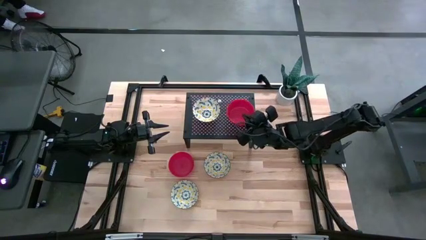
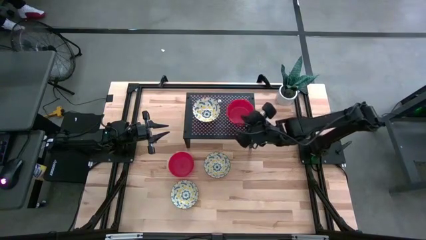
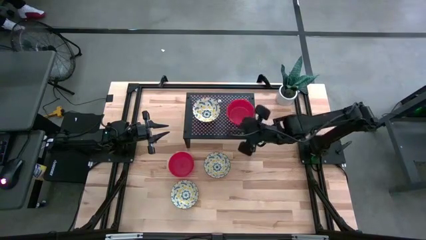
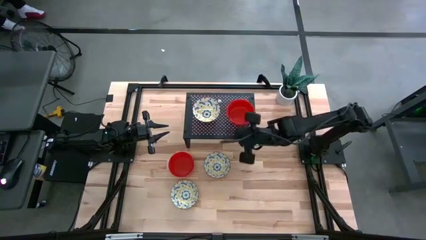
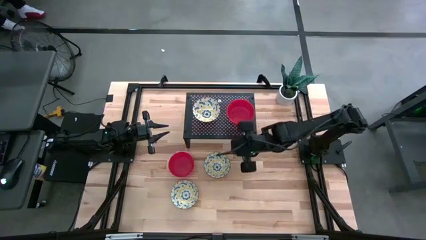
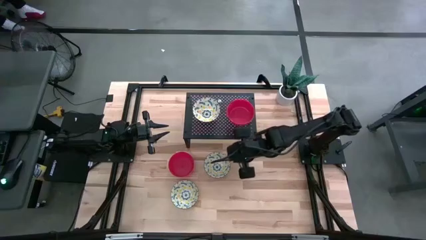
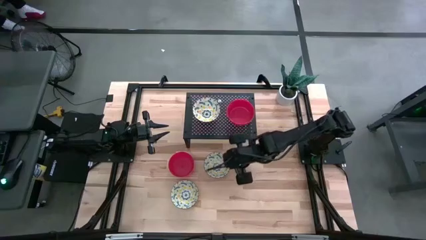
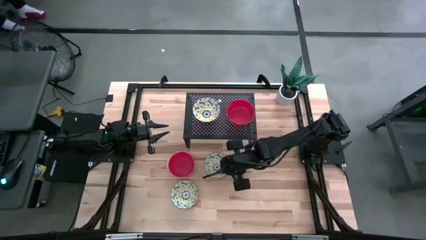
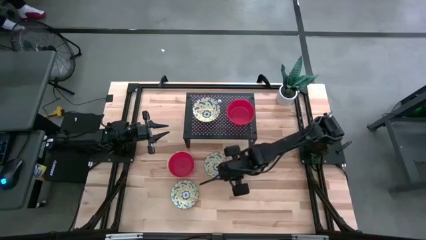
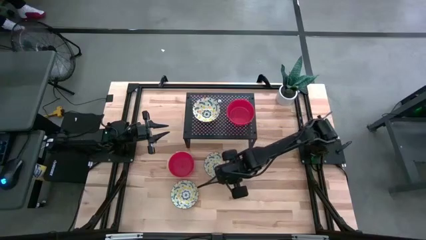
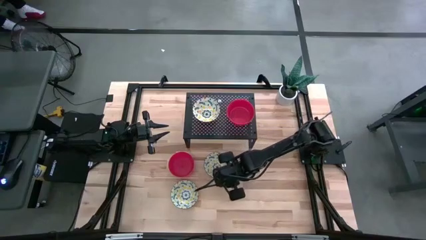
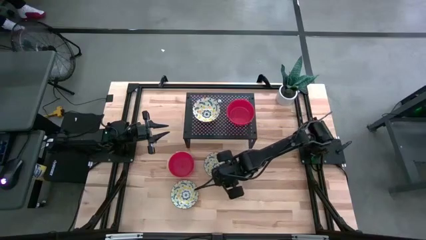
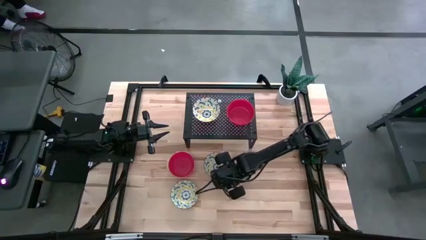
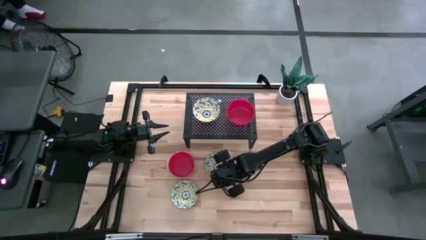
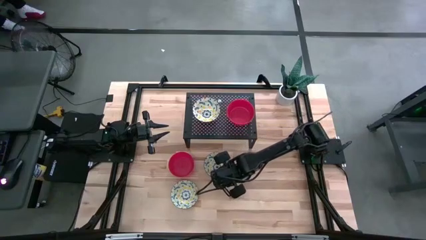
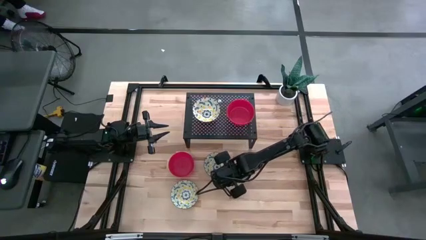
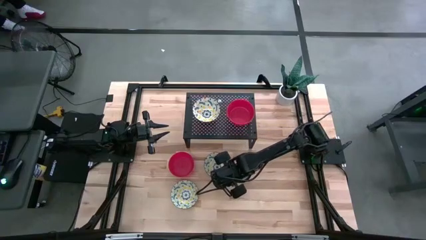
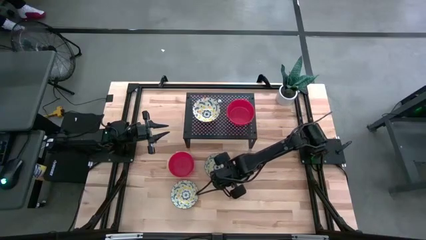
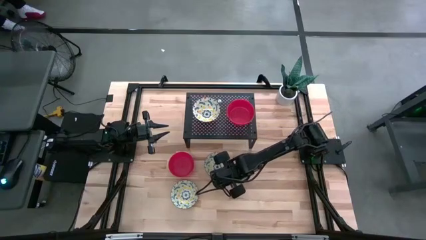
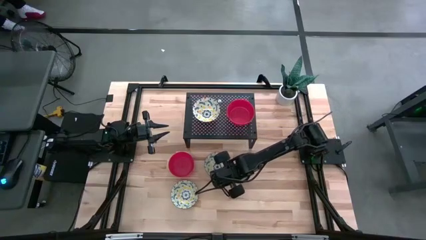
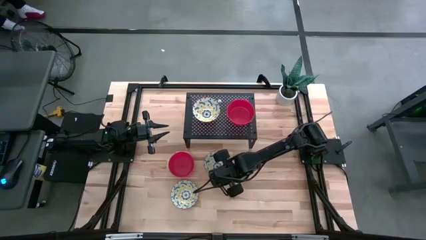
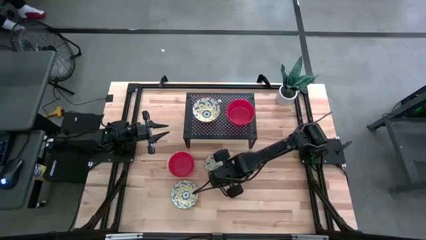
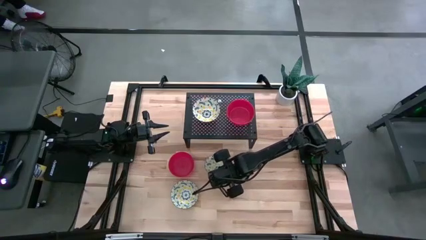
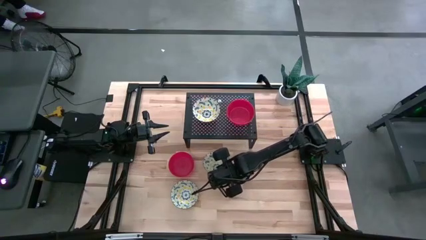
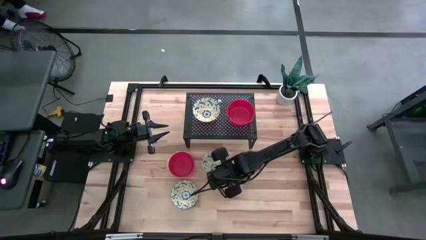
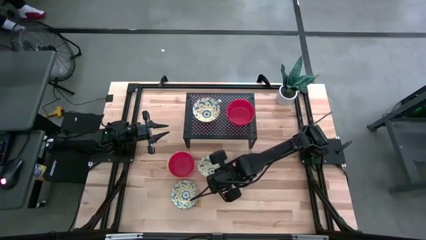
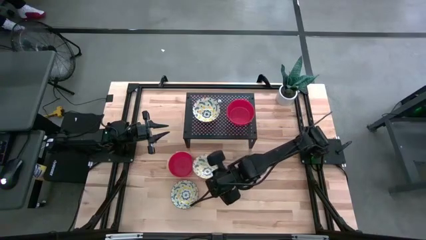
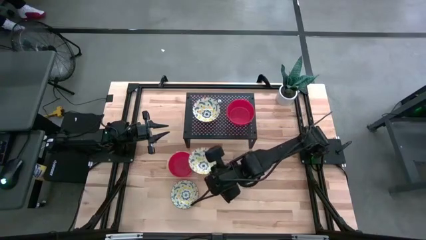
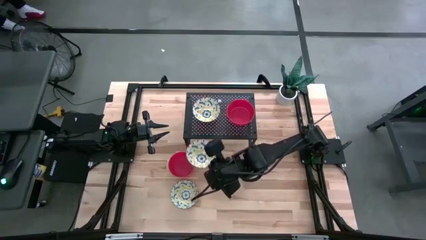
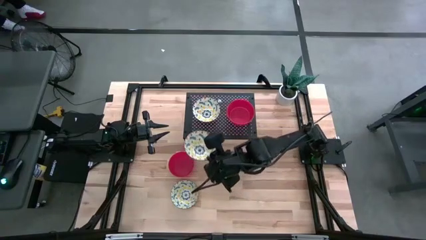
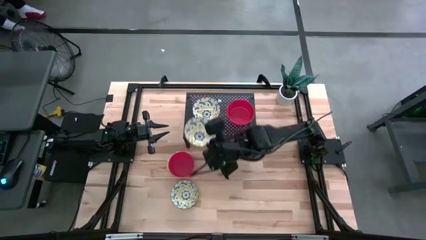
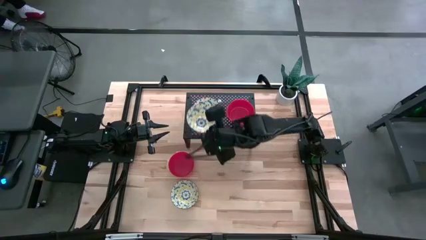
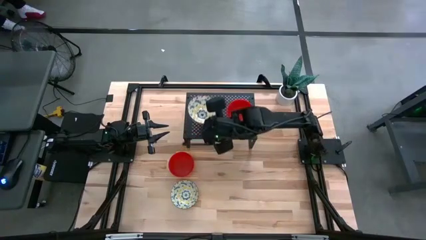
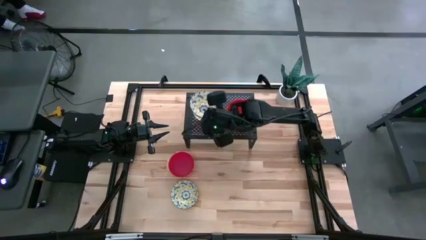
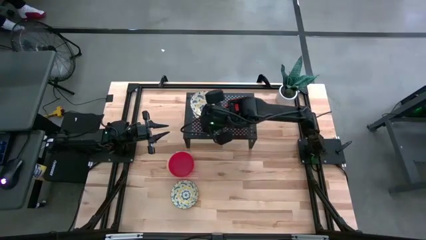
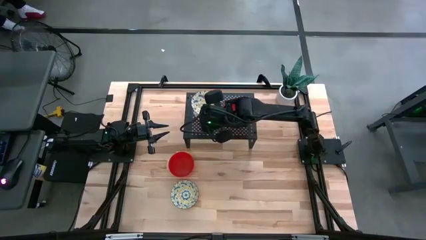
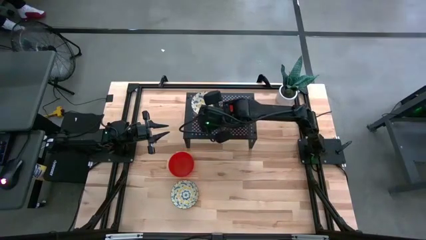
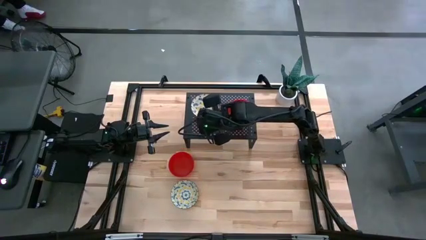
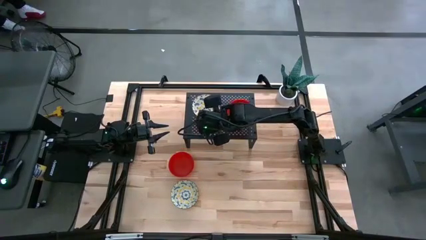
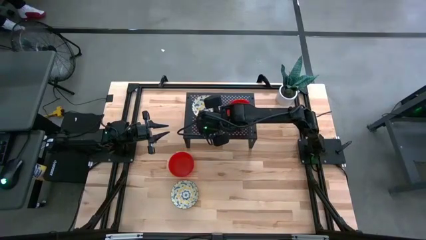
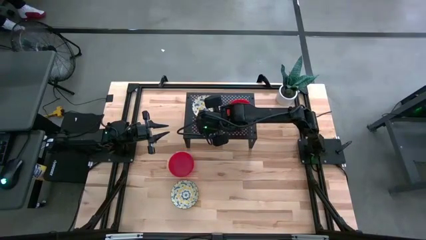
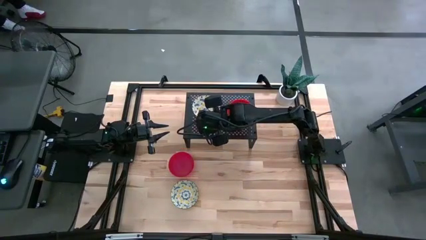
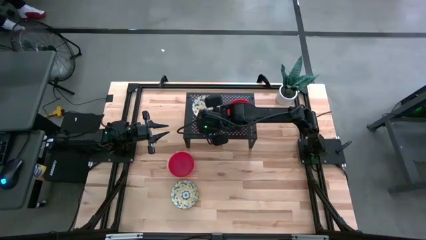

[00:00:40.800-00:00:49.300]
Task: Pick & Place Mini bowls
Stack the top yellow patterned bowl on the yellow patterned bowl on the shelf

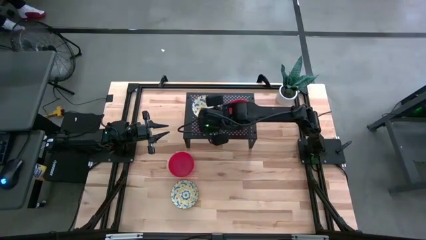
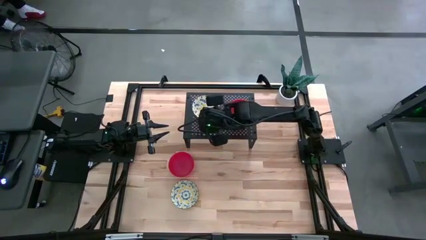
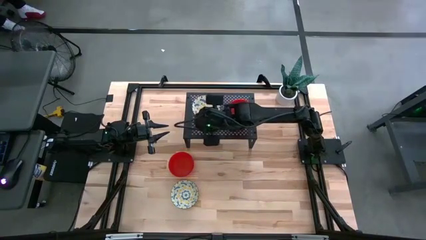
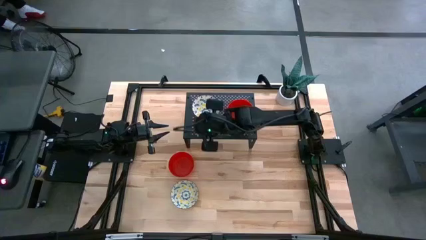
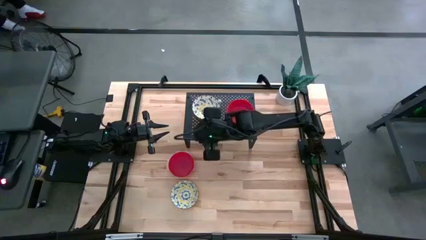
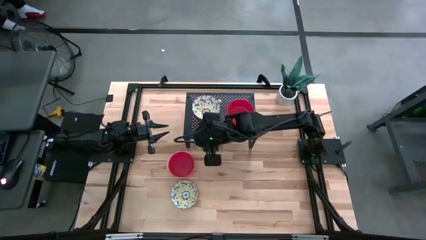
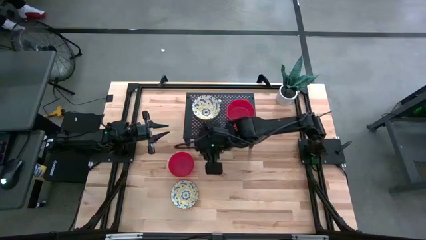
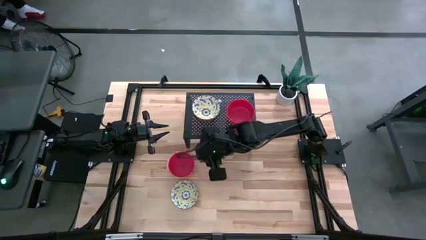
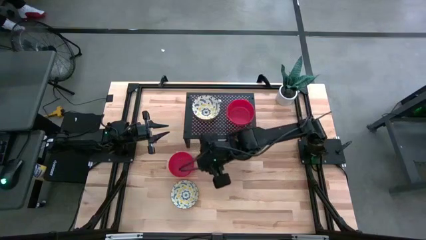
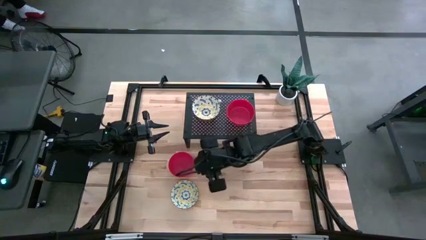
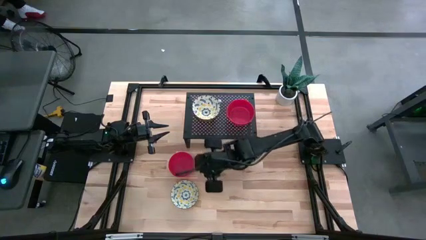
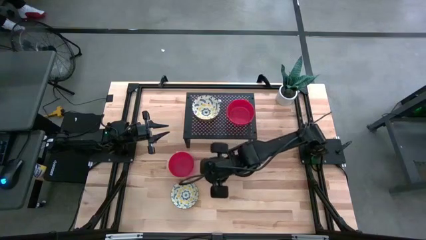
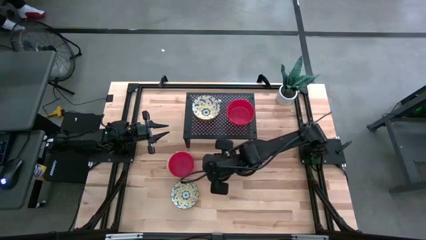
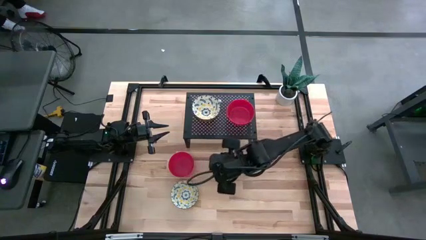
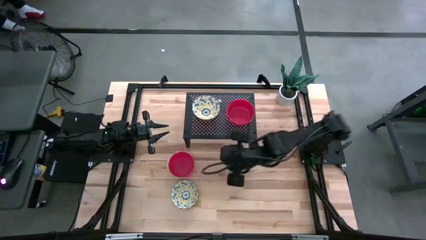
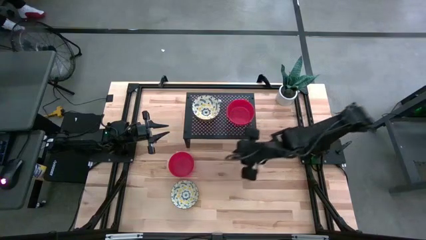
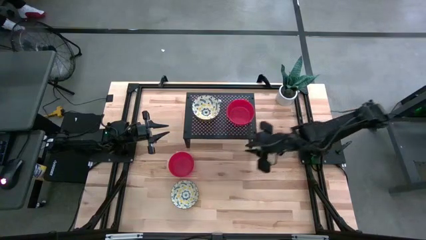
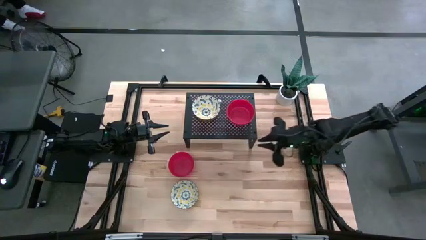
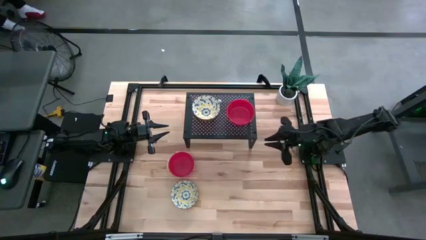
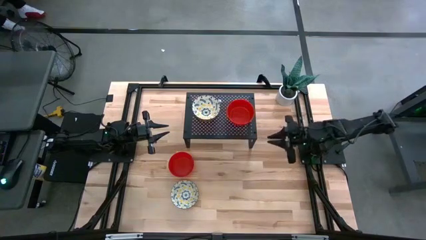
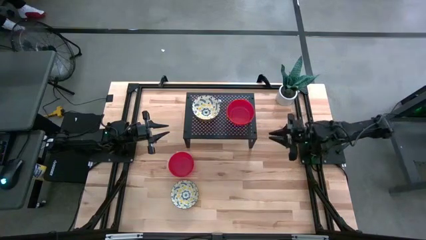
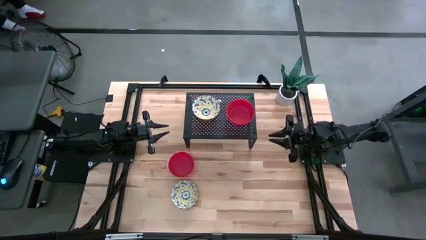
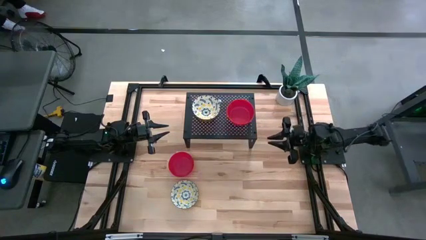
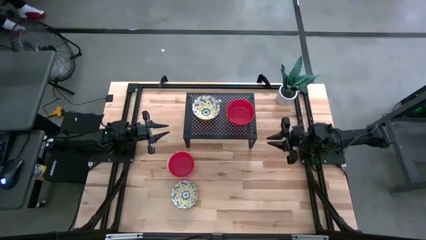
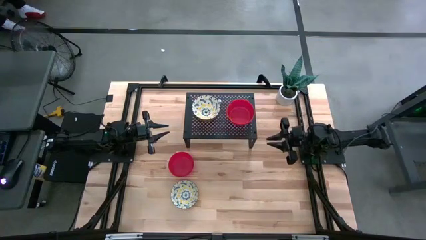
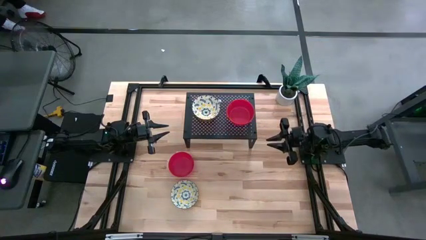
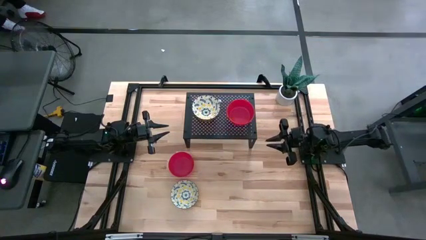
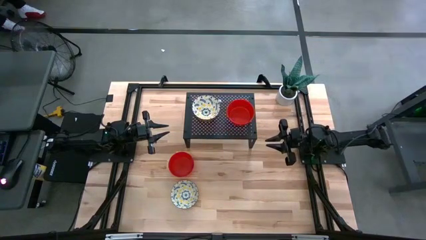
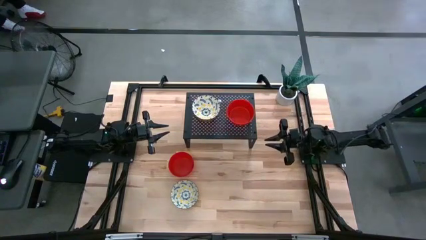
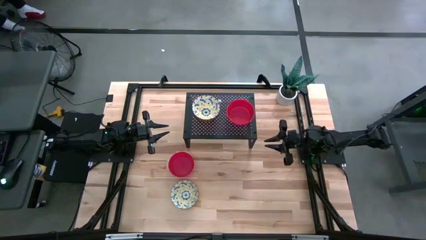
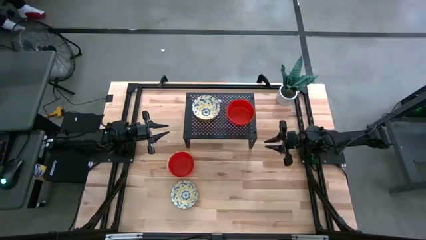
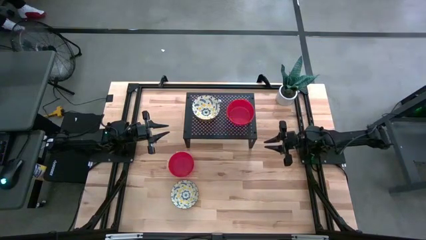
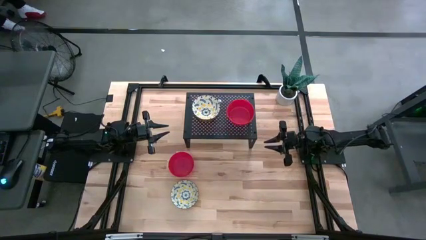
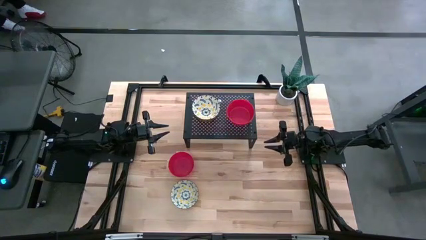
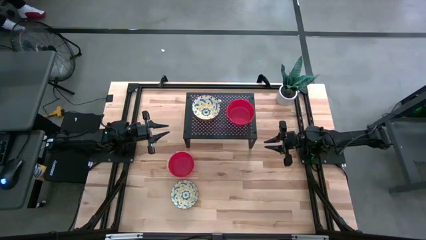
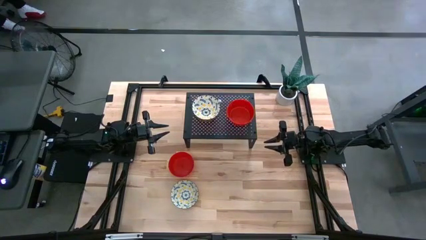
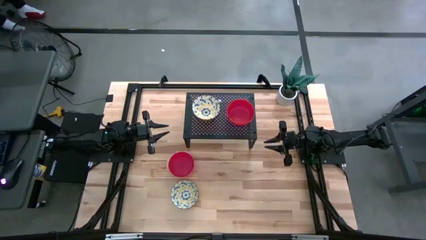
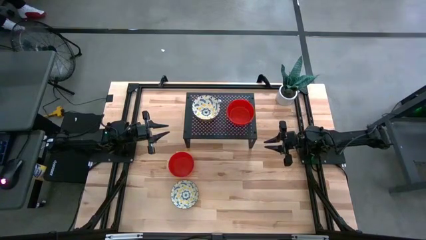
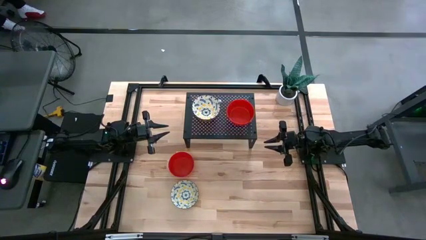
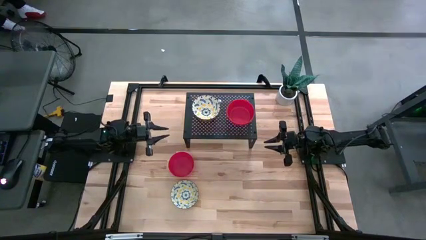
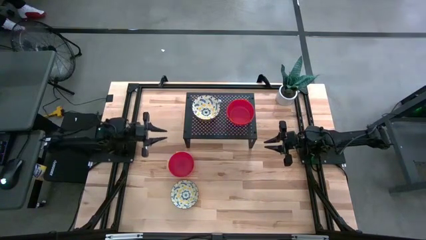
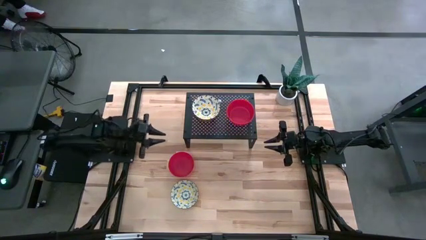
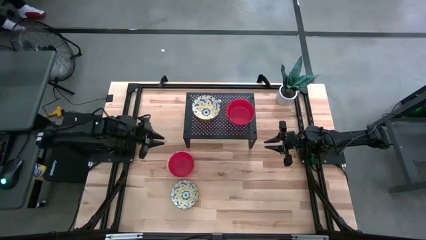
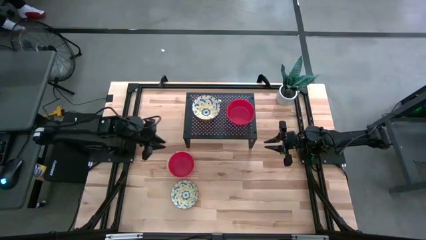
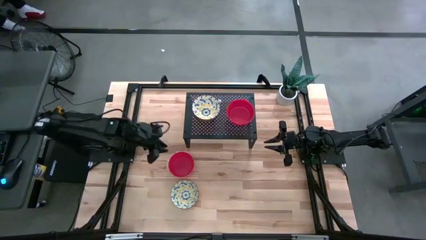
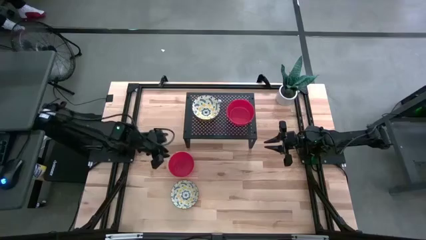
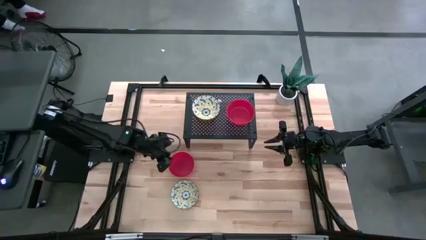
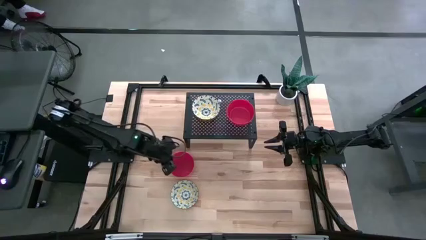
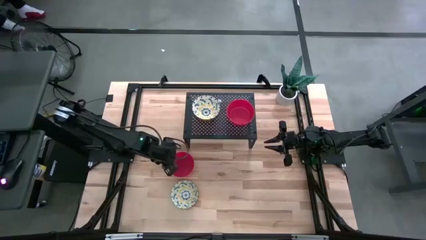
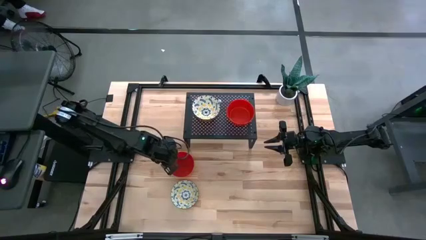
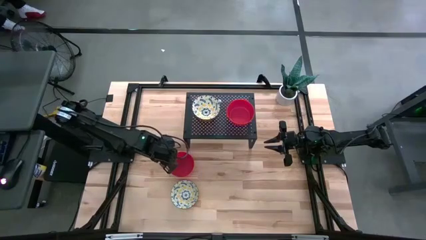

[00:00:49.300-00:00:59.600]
Stack the red bowl on the red bowl on the shelf
